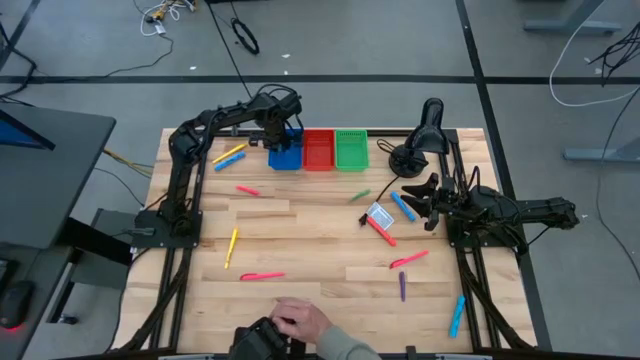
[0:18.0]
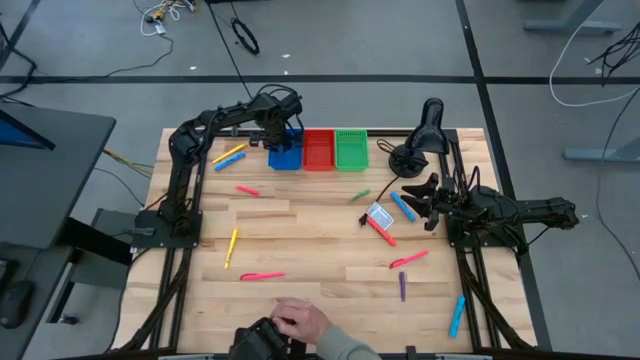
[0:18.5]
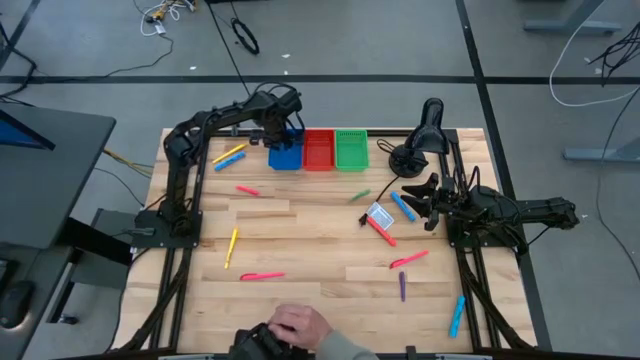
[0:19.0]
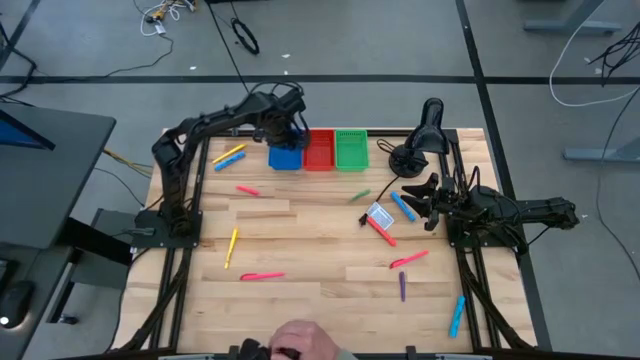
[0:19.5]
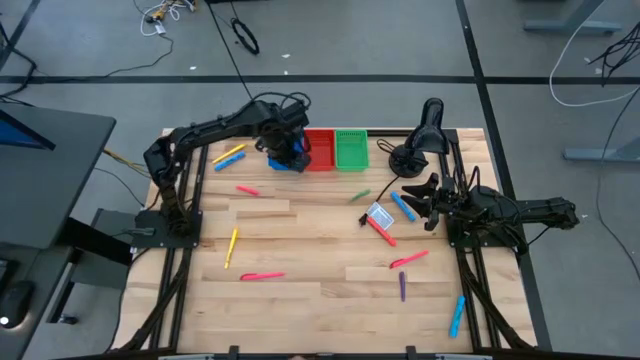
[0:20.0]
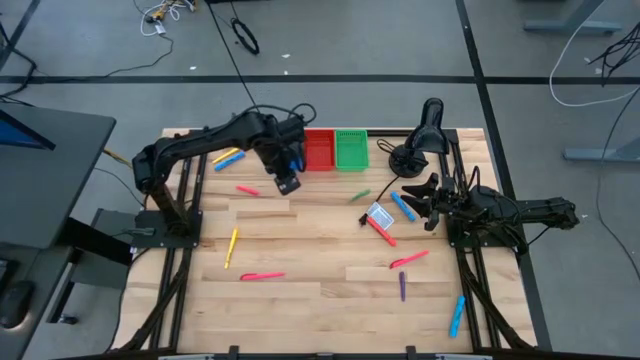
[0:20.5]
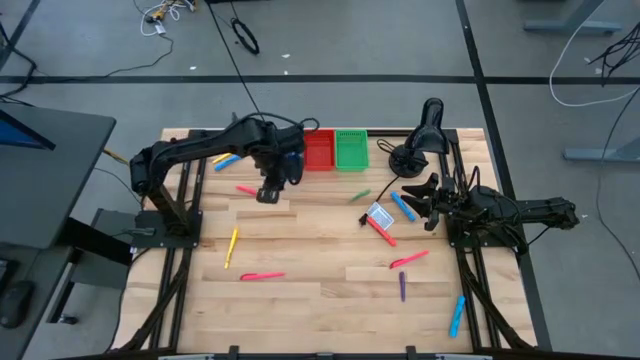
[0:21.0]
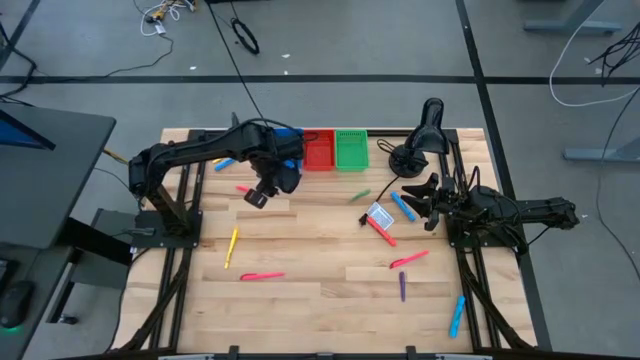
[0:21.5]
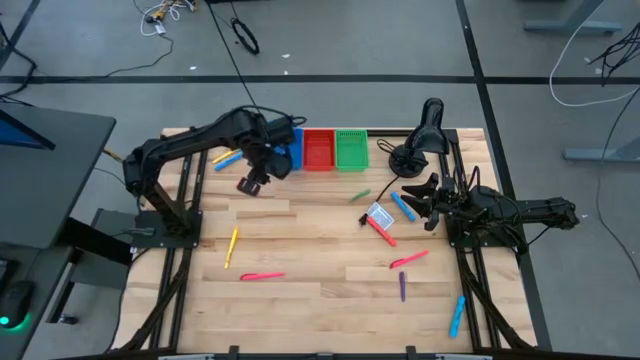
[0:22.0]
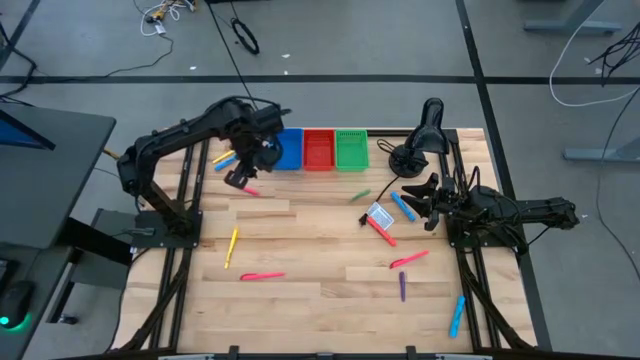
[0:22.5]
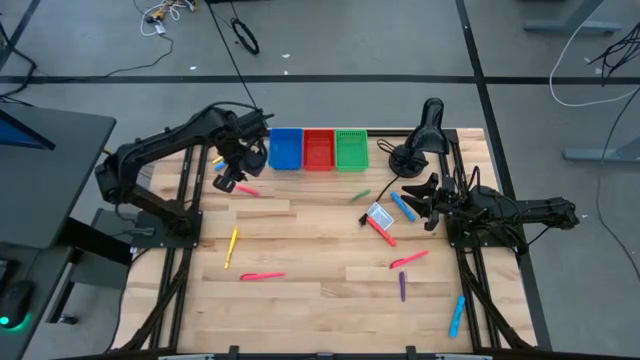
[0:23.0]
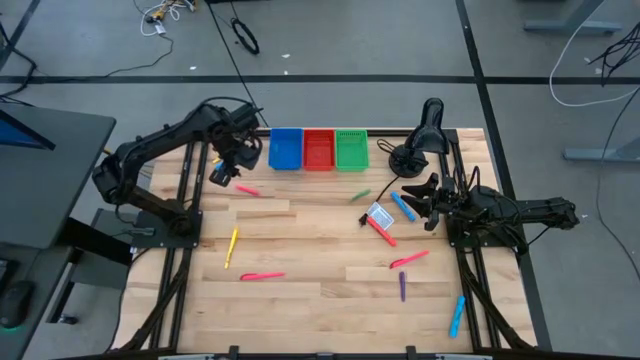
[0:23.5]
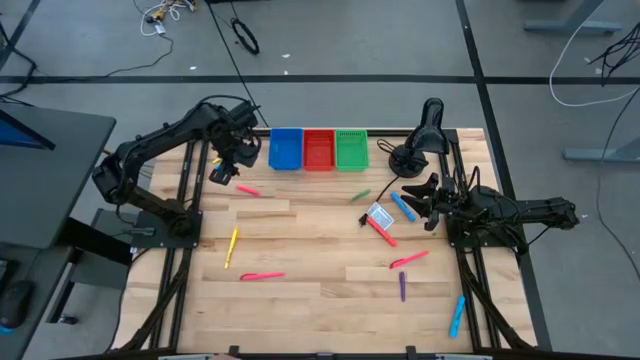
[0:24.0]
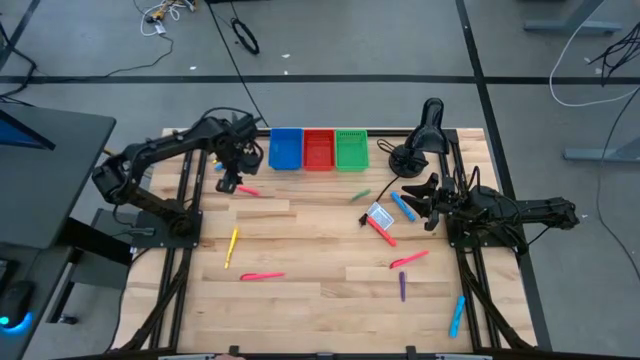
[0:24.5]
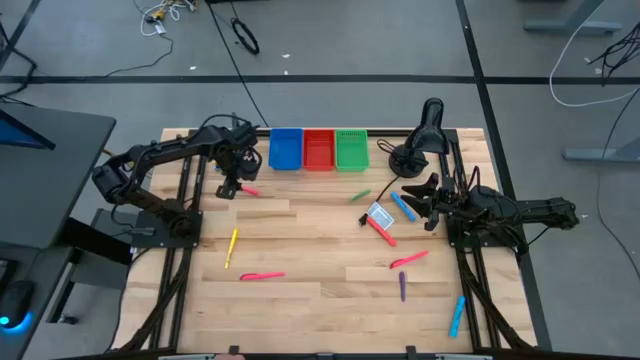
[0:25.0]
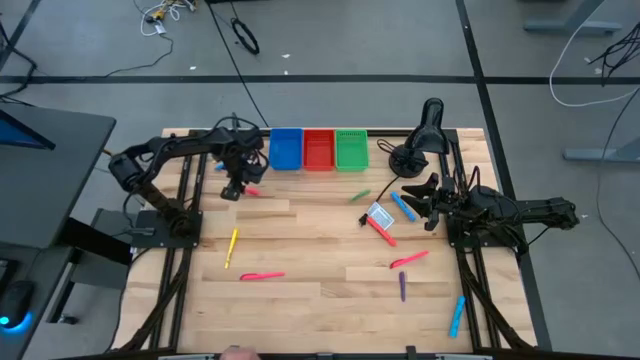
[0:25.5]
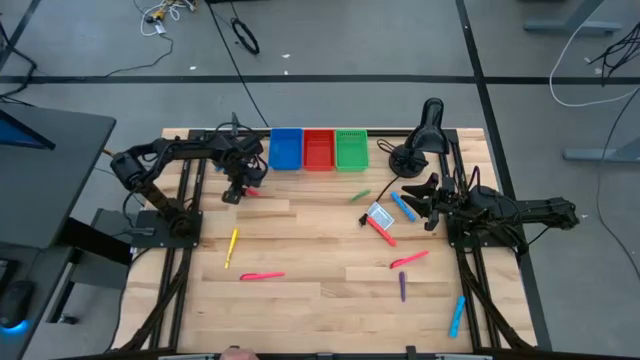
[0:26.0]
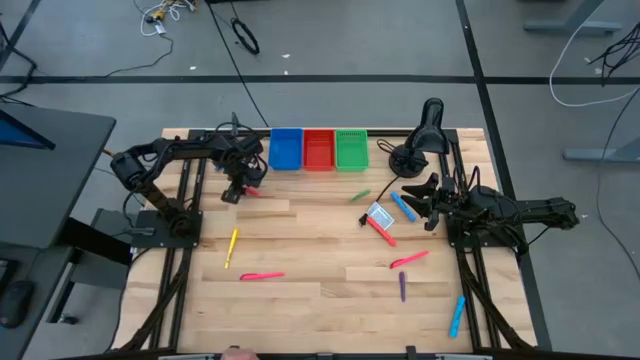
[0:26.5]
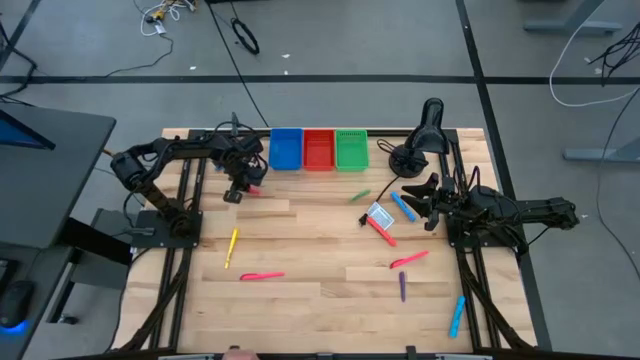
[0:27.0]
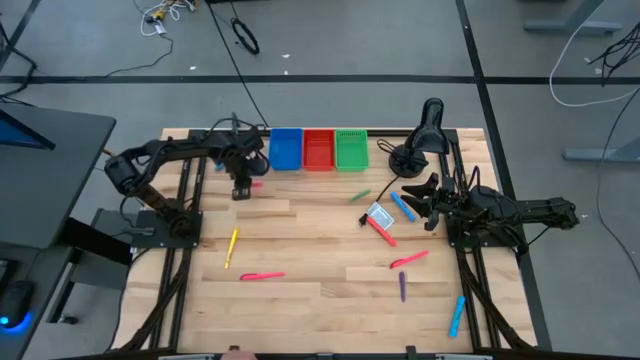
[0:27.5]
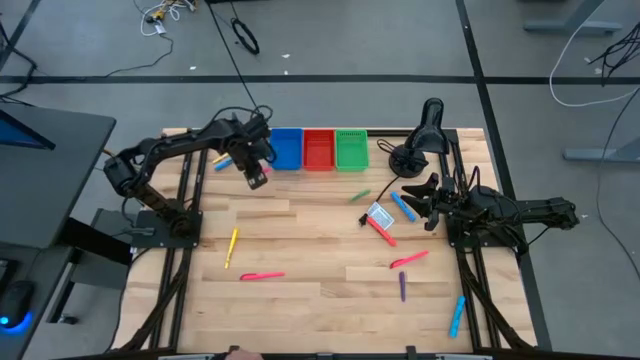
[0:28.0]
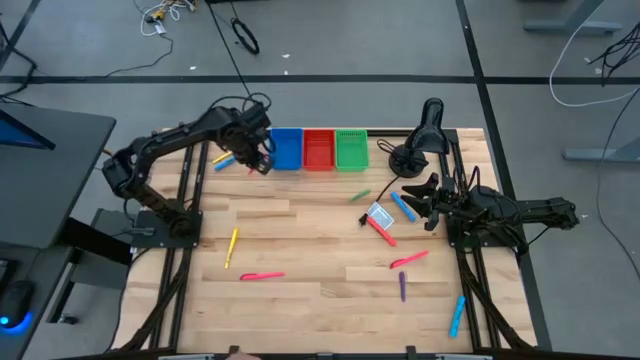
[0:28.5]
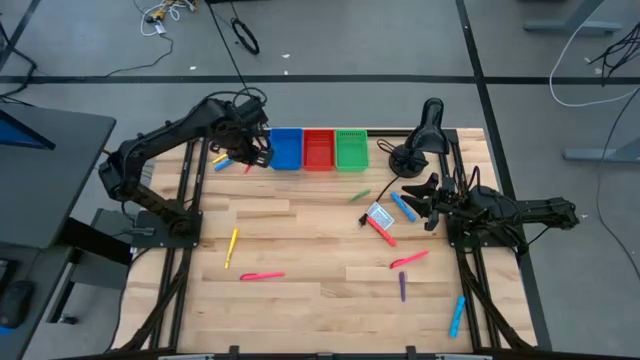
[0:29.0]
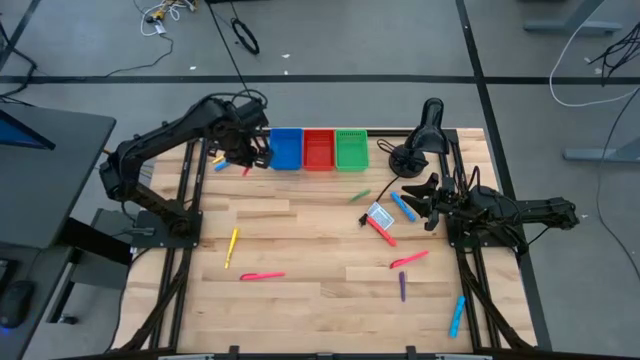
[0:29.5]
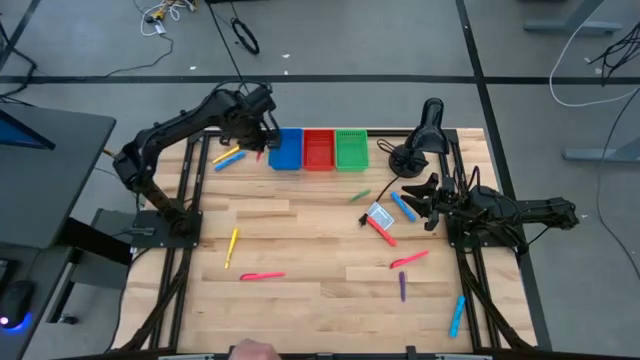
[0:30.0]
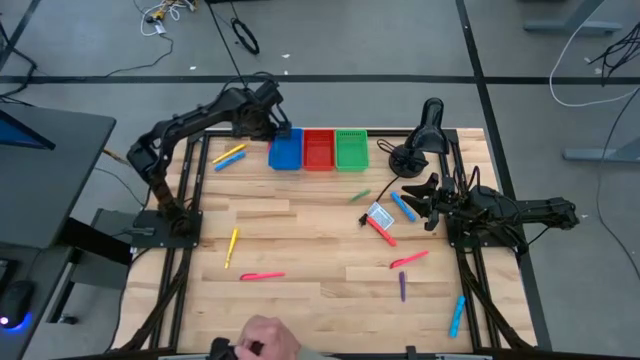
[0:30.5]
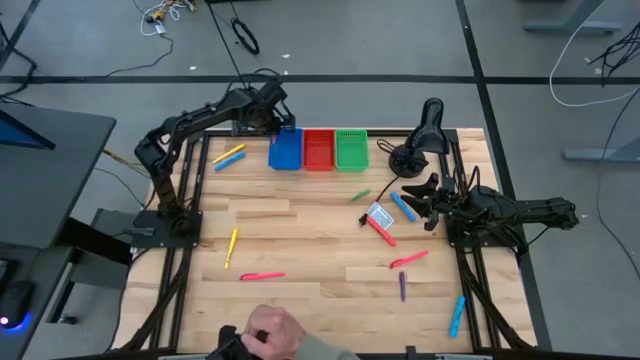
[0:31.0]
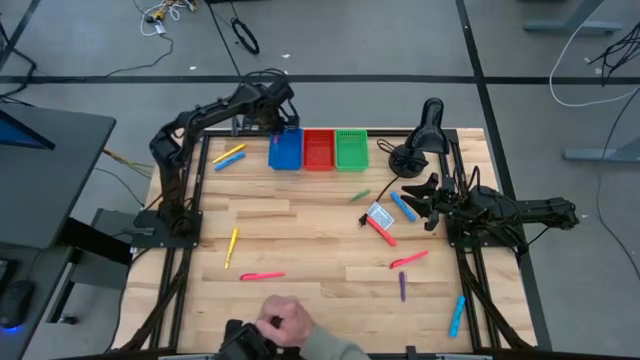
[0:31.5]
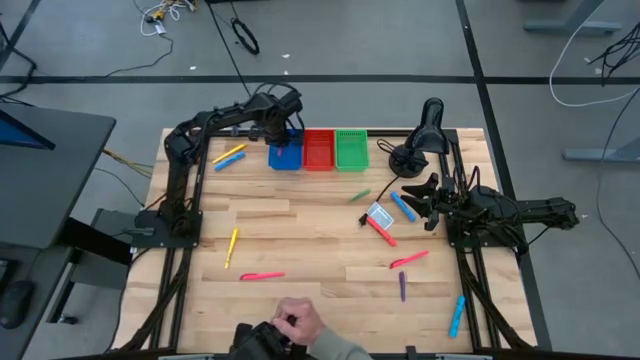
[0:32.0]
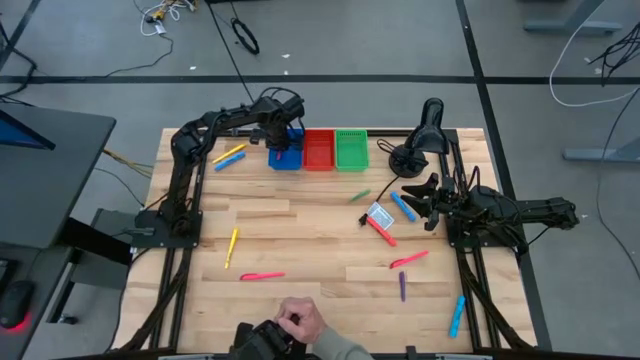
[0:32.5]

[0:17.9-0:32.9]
Task: Pick & Place Markers
Put the pink pen into the blue bin
